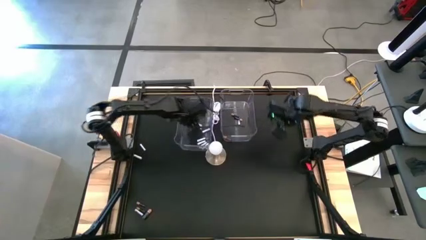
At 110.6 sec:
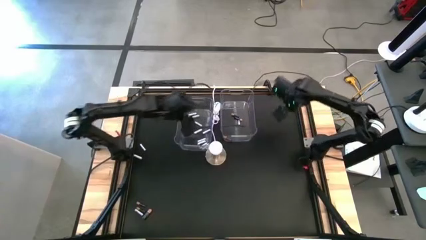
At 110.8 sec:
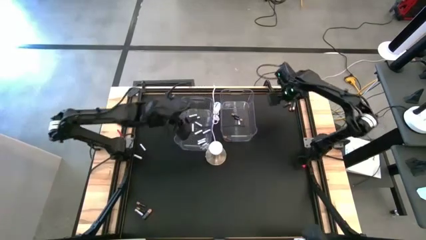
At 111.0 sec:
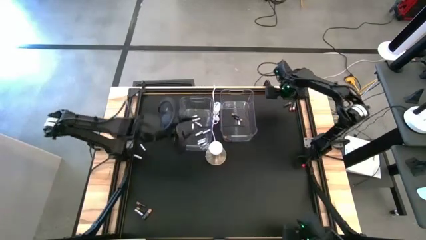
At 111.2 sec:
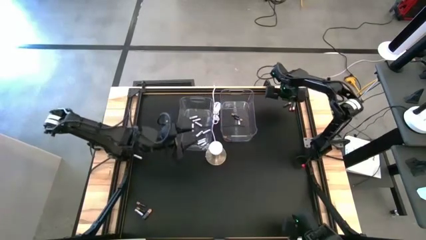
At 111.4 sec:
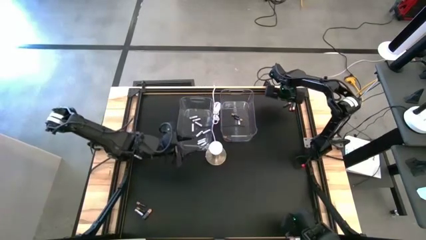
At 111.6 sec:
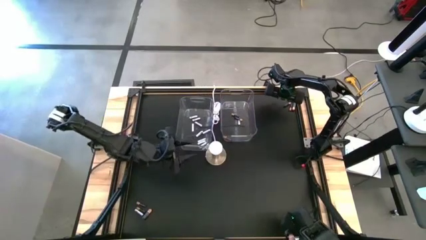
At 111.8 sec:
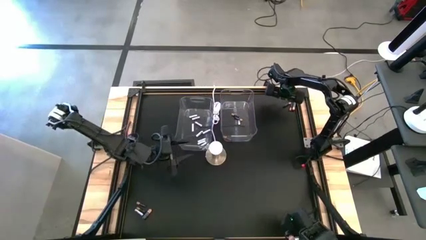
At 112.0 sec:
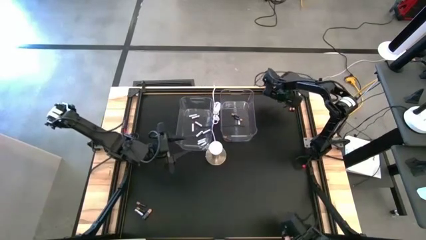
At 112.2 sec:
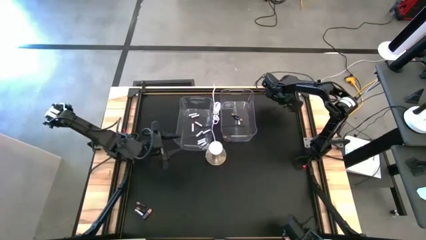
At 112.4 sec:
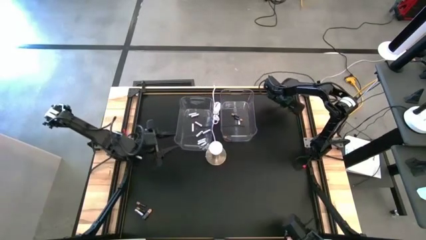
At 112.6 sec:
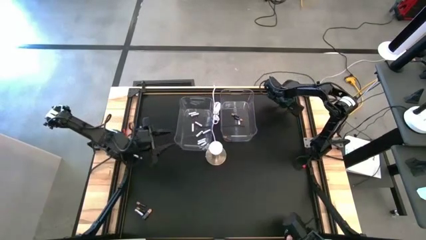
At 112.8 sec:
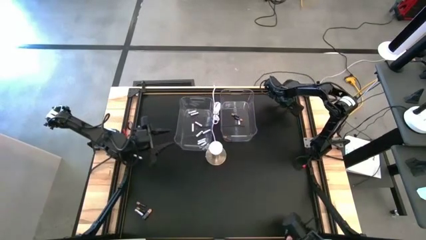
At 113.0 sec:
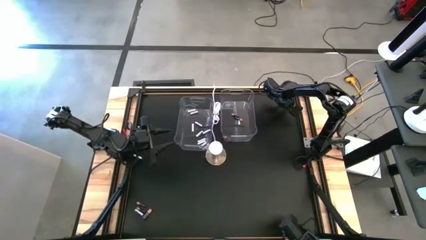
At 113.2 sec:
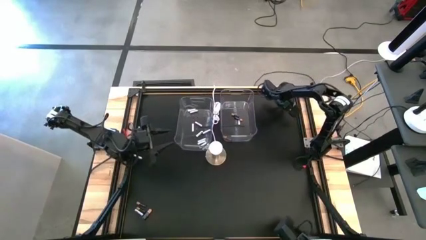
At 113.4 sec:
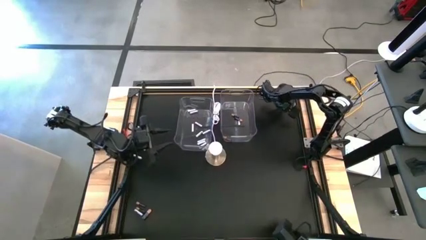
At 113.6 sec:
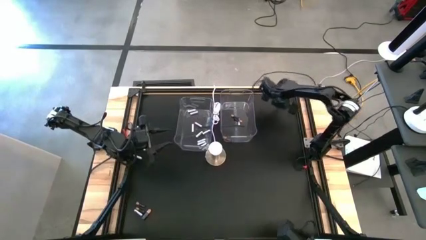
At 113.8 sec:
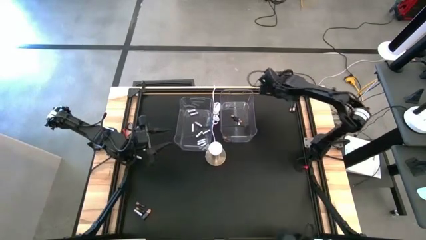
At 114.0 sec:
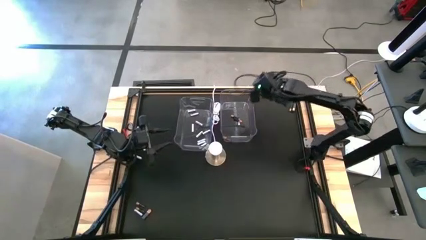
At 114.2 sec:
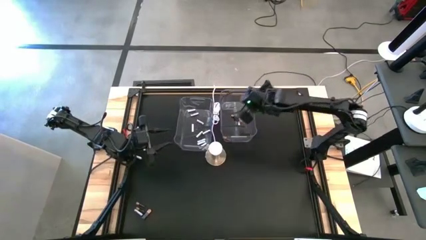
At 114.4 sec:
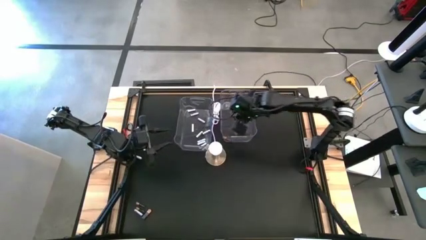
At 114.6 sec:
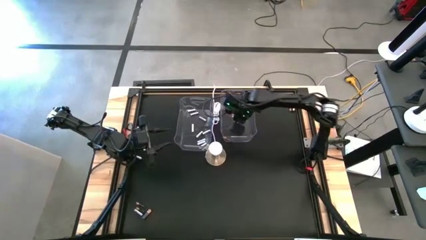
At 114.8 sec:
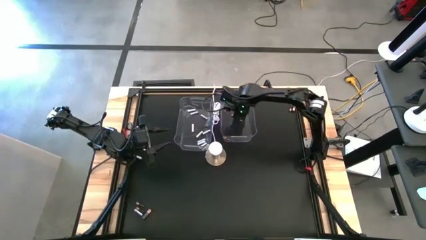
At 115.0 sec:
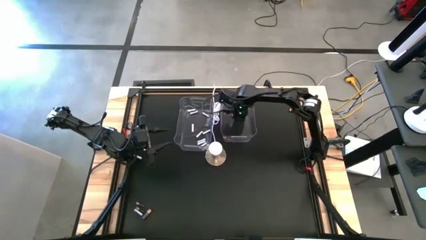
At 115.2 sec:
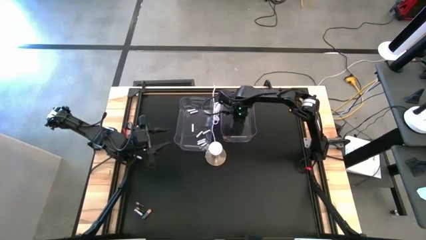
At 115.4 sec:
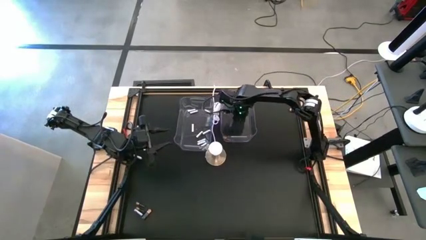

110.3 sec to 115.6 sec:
Task: Sort batteries
Put the black battery into the right transparent bin

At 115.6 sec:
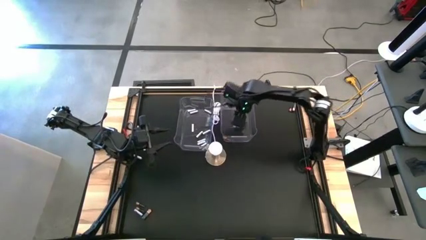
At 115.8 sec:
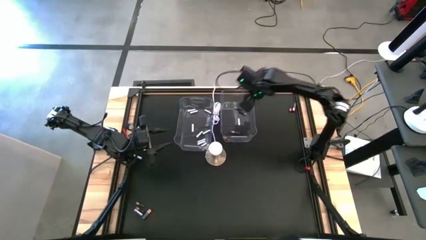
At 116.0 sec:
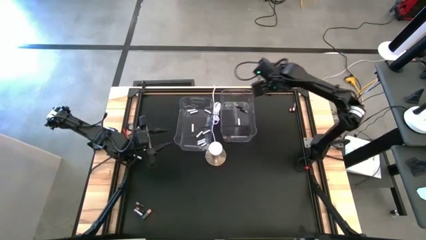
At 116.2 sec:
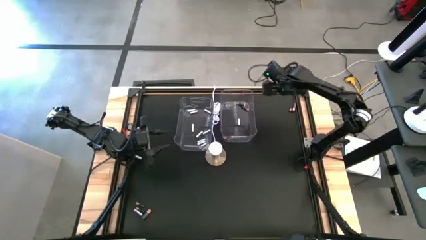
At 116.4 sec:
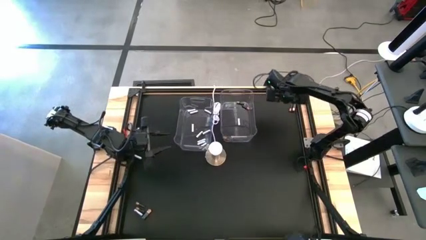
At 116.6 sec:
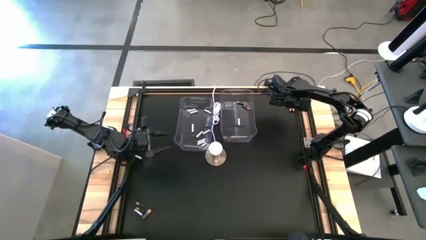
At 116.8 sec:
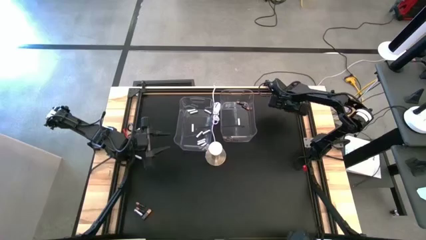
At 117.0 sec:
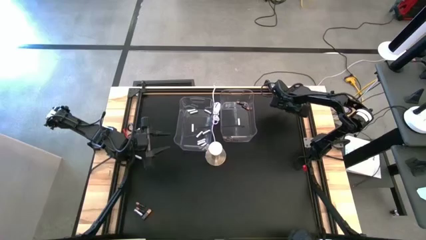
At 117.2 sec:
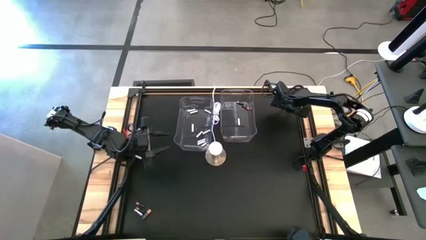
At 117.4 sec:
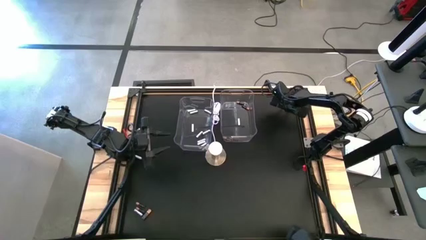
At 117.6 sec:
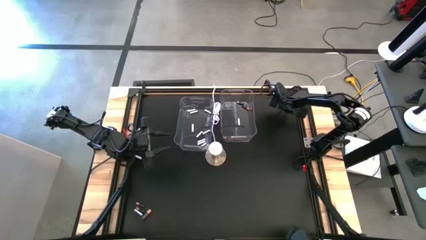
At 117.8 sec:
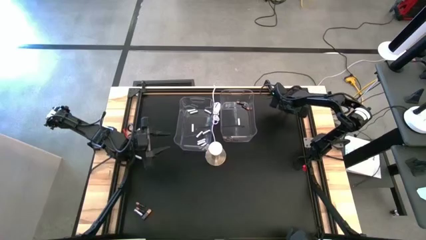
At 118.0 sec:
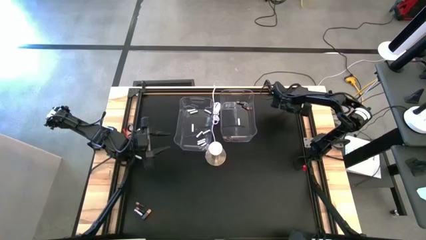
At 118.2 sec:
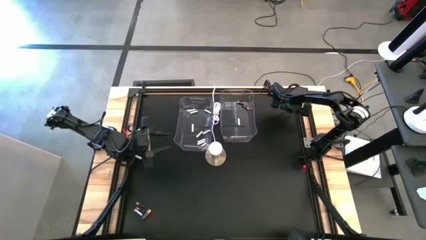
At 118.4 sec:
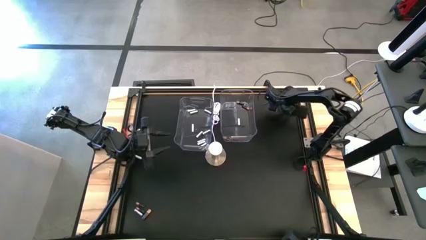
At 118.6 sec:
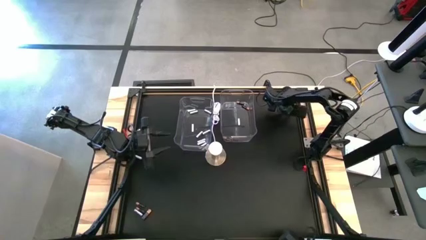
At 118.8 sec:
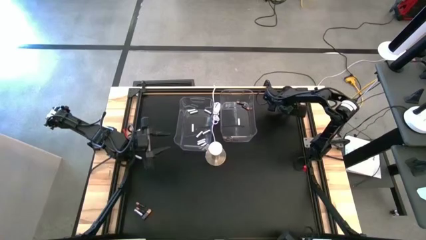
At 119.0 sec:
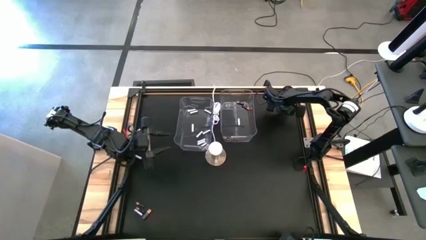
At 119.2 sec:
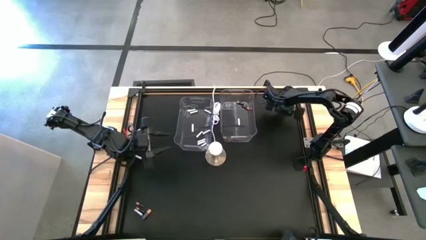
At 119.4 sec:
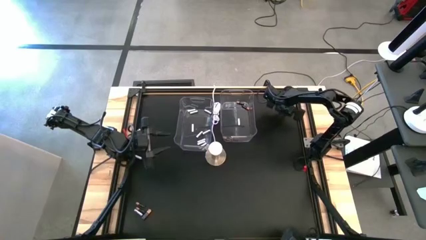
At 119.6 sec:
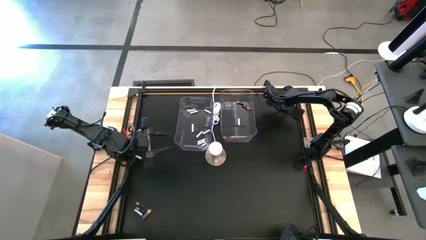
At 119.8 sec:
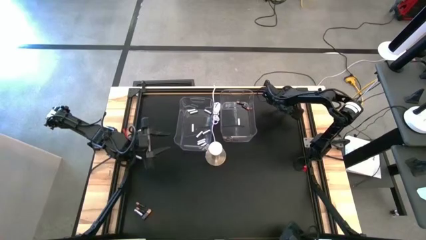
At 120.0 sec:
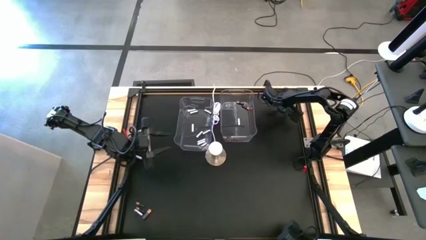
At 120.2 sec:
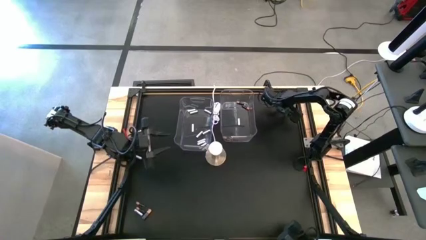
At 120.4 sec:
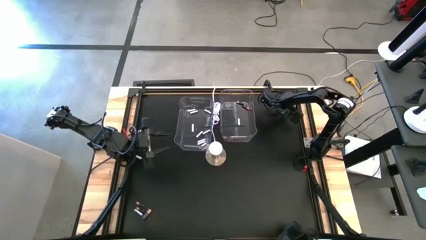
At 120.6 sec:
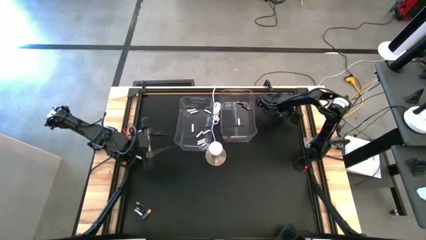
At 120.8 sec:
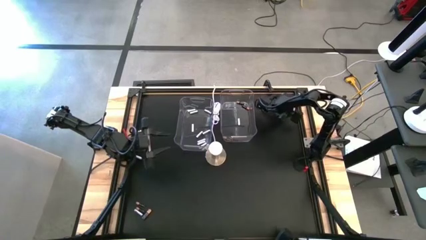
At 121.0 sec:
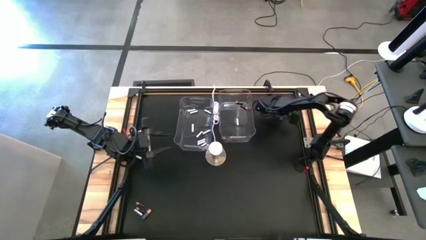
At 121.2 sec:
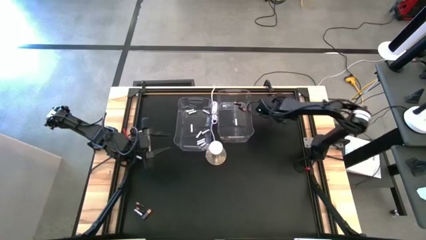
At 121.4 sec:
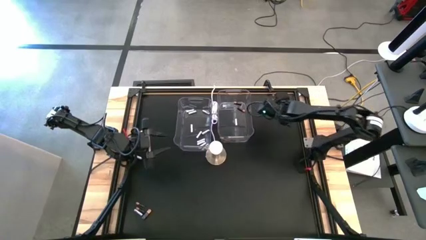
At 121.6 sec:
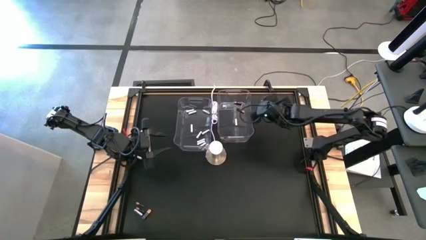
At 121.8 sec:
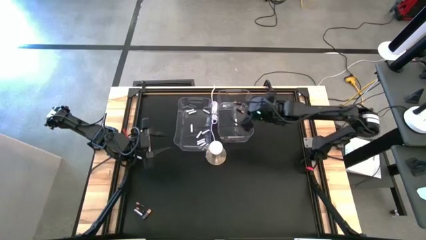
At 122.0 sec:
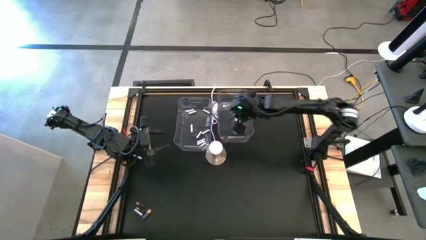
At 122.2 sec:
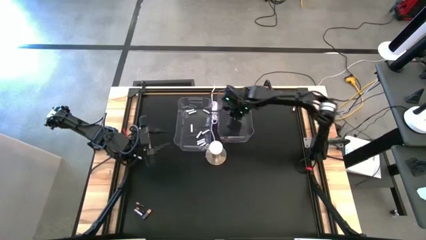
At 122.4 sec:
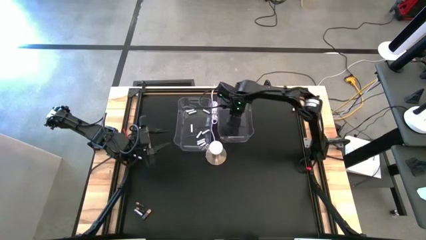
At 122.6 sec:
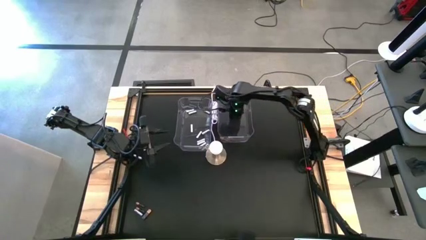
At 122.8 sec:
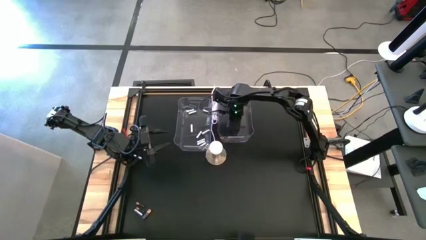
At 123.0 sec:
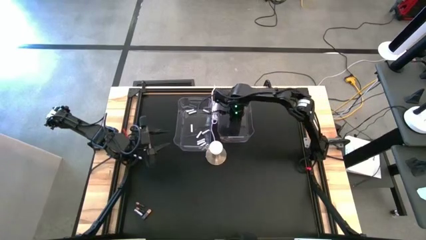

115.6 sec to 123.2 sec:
Put the black battery into the right transparent bin

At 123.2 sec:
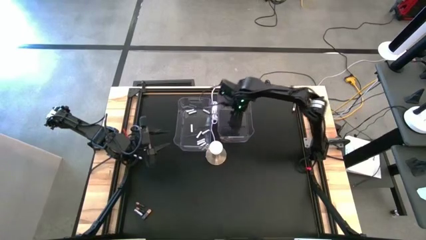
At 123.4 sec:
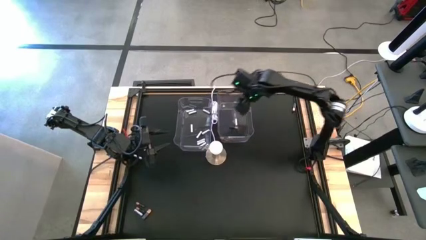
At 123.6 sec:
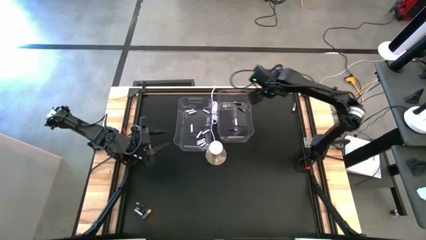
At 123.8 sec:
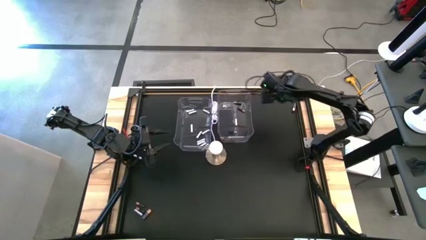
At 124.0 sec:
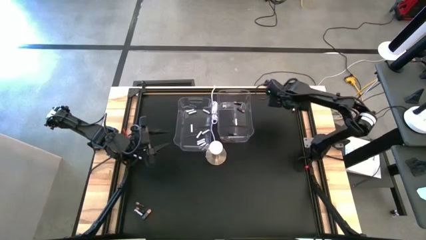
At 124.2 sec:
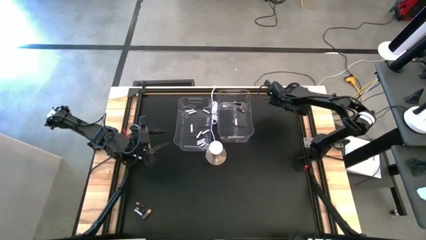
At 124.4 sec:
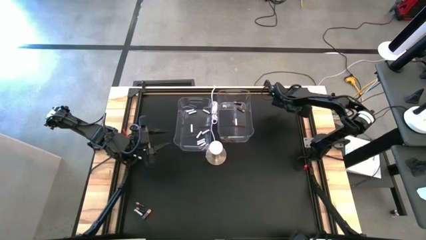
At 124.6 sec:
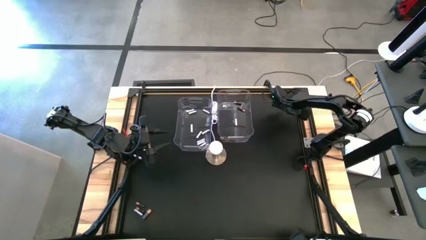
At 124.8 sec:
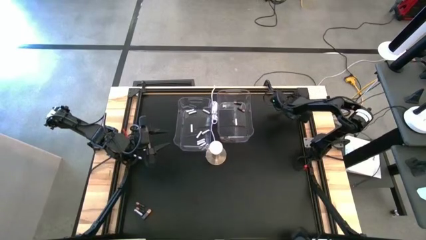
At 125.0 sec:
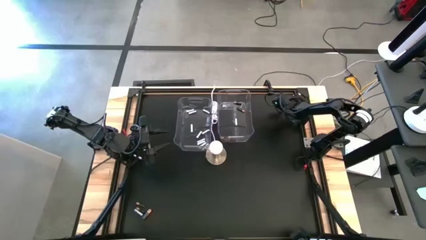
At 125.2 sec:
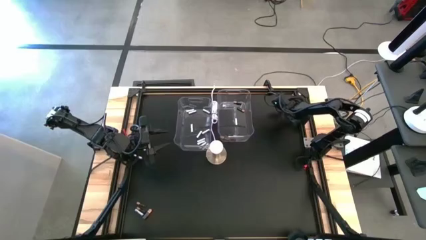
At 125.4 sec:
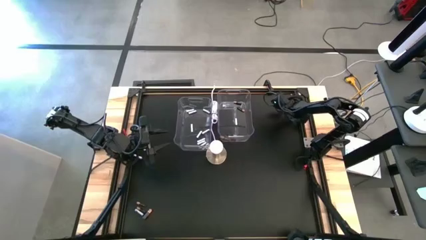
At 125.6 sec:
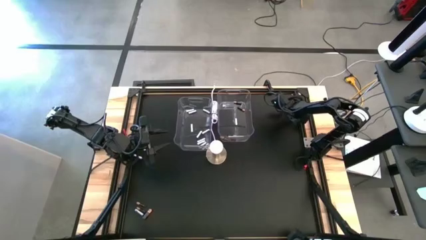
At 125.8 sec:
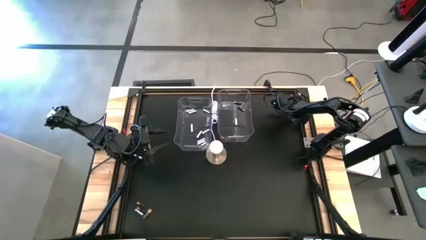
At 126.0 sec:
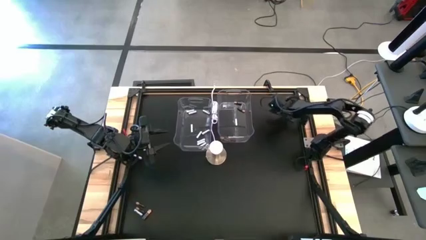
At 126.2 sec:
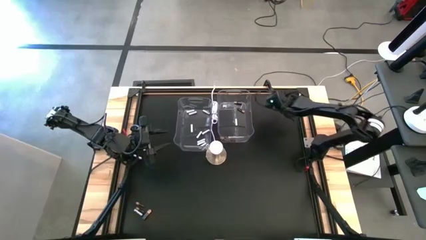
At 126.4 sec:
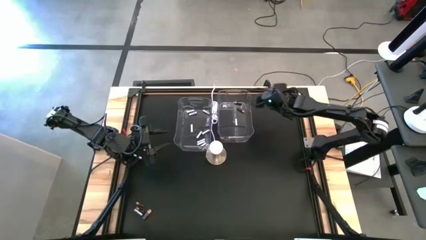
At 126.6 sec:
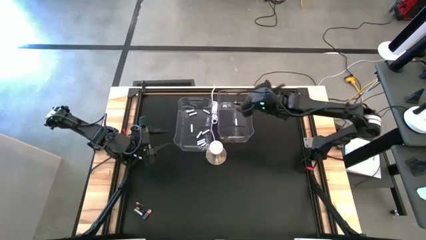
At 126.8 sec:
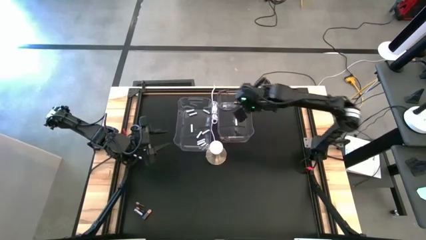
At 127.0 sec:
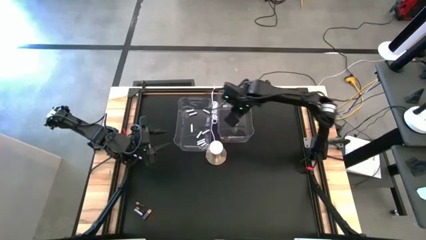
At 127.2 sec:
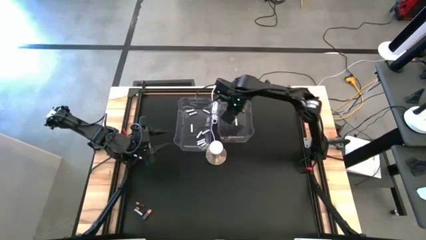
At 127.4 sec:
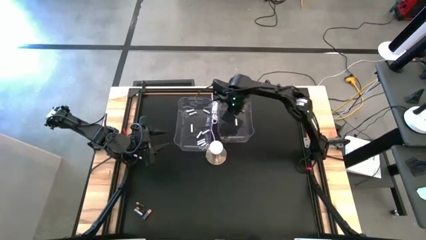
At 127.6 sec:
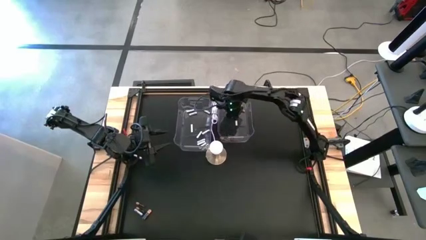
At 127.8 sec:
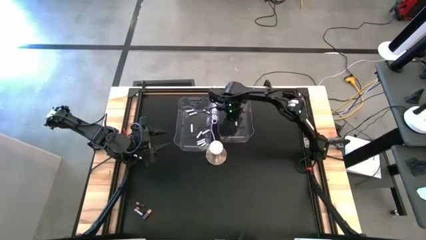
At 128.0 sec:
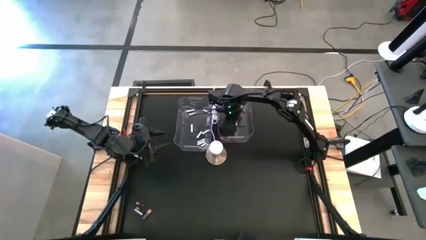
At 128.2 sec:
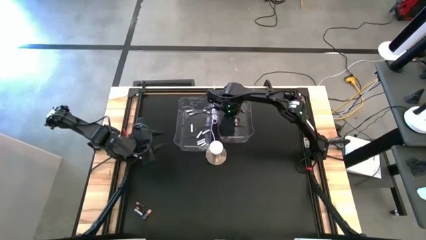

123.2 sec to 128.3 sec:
Put the black battery into the right transparent bin
